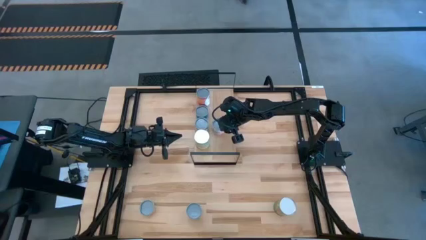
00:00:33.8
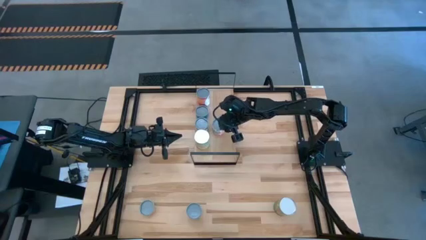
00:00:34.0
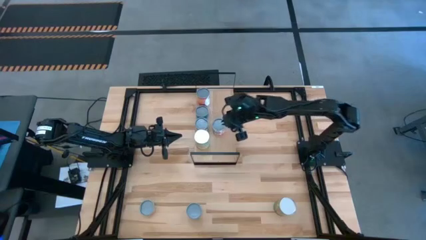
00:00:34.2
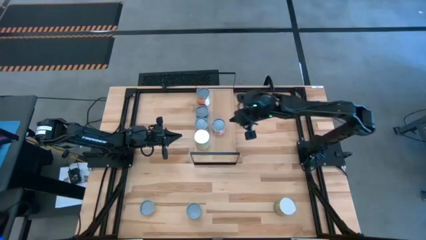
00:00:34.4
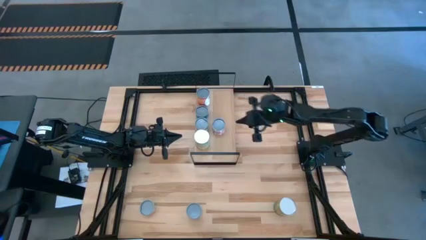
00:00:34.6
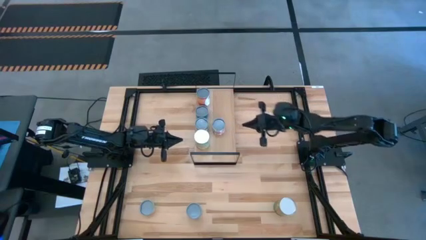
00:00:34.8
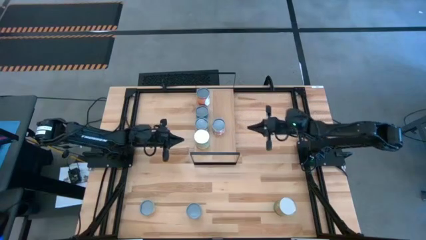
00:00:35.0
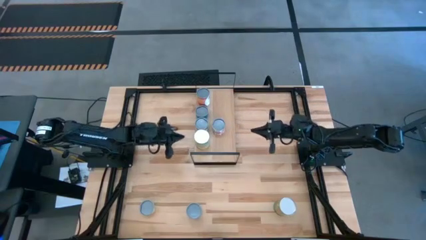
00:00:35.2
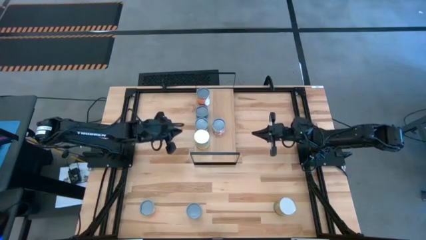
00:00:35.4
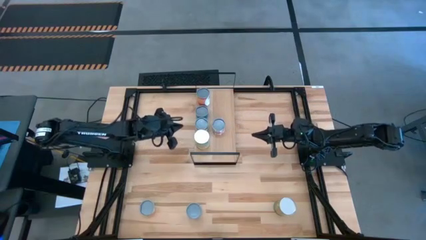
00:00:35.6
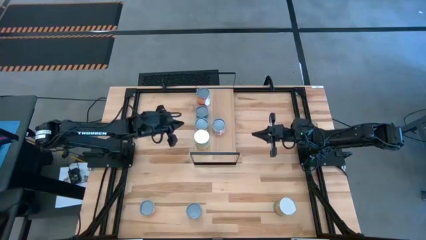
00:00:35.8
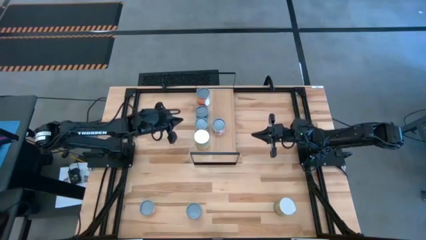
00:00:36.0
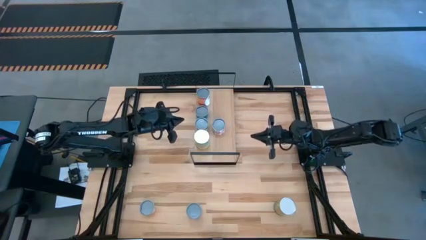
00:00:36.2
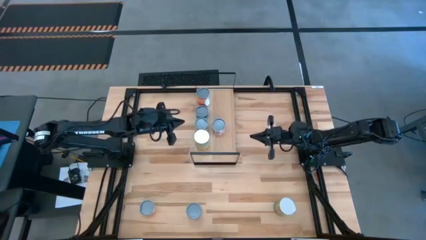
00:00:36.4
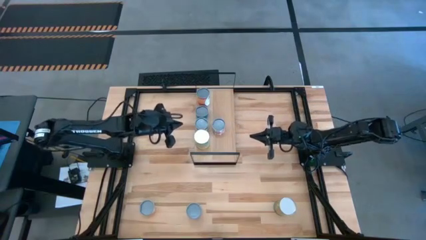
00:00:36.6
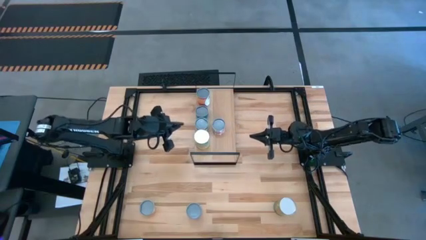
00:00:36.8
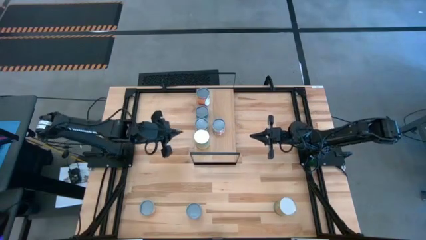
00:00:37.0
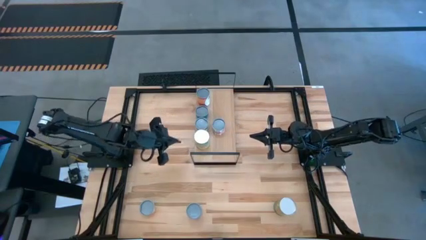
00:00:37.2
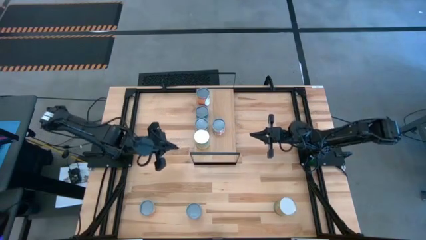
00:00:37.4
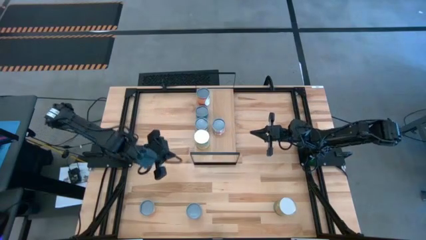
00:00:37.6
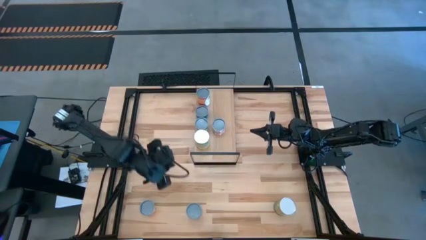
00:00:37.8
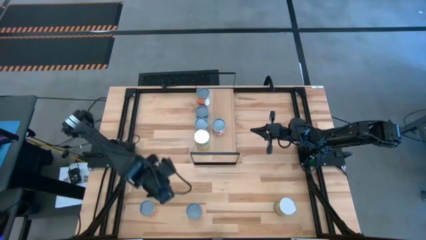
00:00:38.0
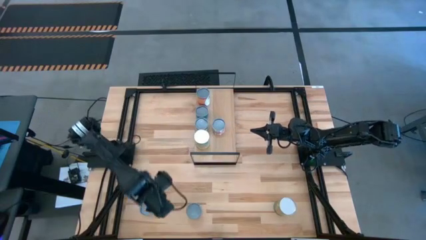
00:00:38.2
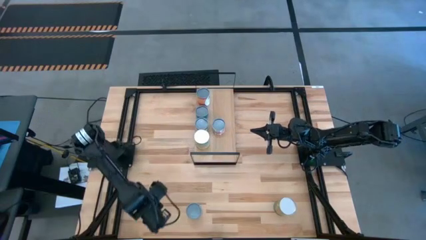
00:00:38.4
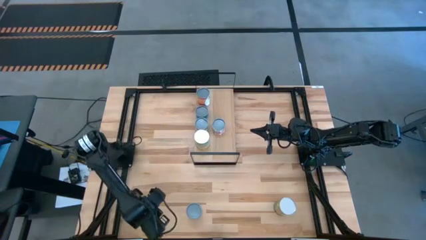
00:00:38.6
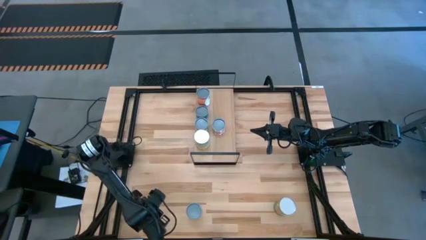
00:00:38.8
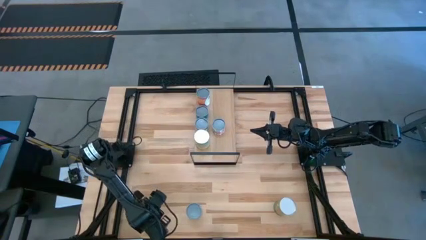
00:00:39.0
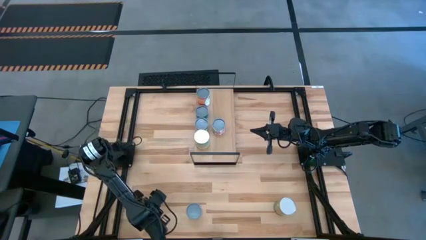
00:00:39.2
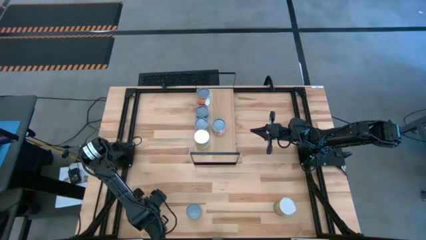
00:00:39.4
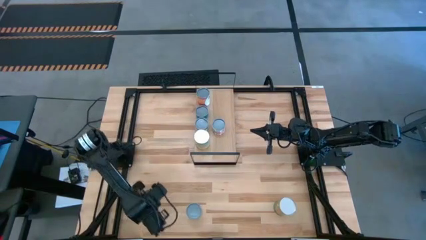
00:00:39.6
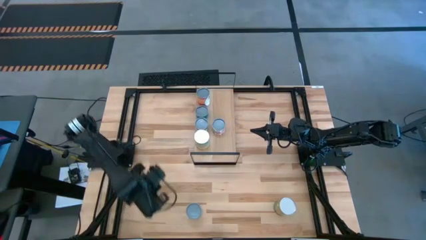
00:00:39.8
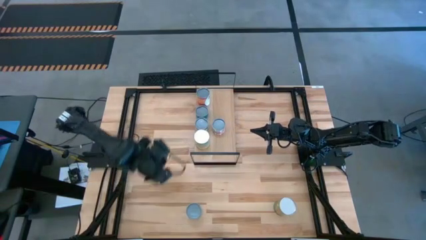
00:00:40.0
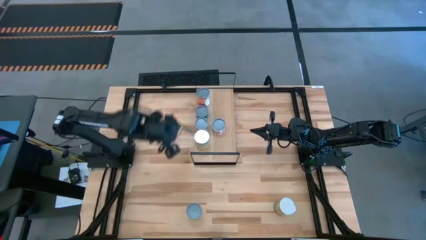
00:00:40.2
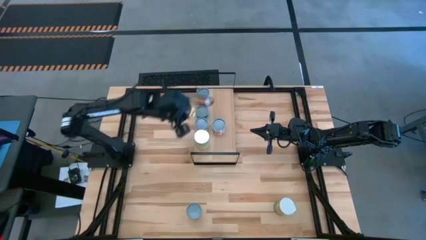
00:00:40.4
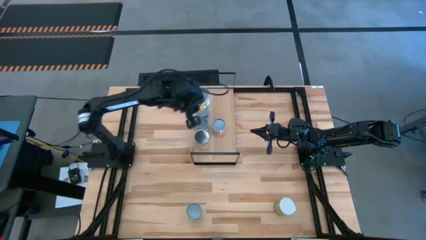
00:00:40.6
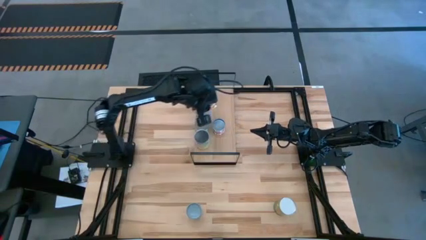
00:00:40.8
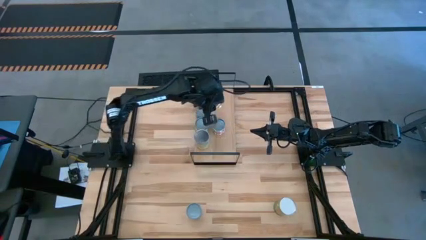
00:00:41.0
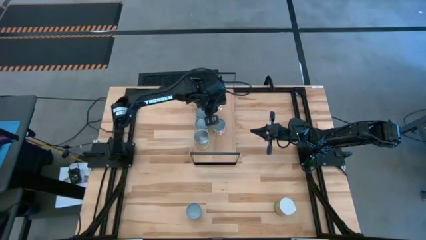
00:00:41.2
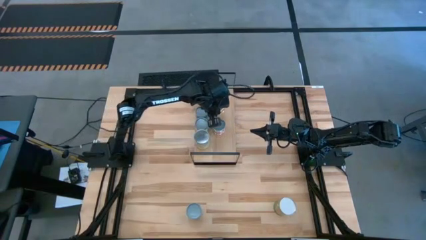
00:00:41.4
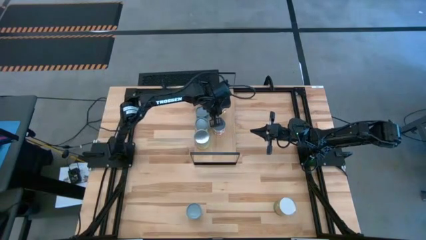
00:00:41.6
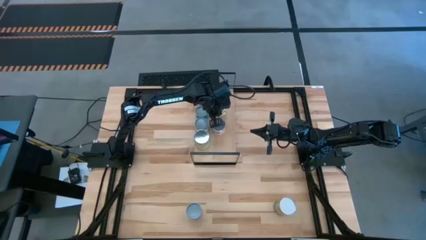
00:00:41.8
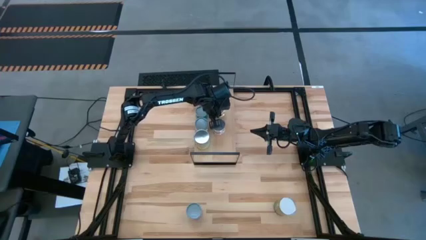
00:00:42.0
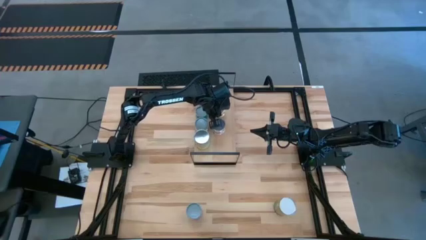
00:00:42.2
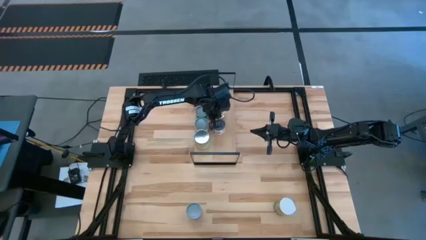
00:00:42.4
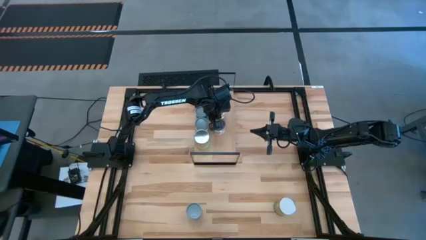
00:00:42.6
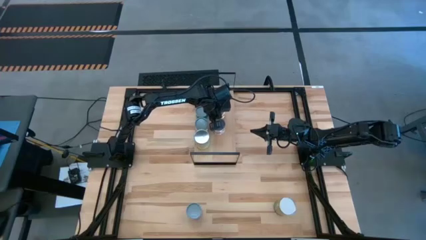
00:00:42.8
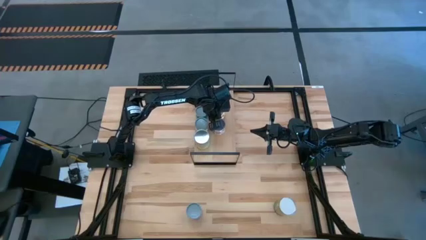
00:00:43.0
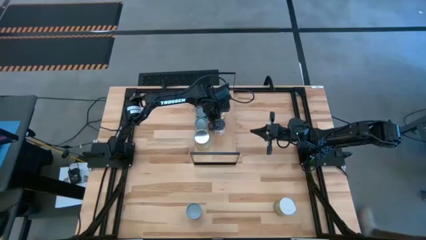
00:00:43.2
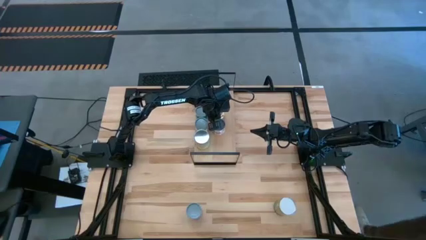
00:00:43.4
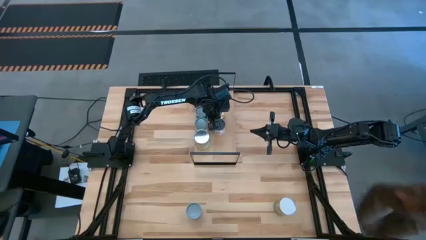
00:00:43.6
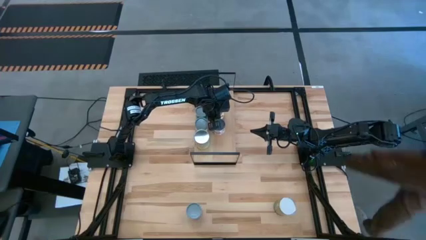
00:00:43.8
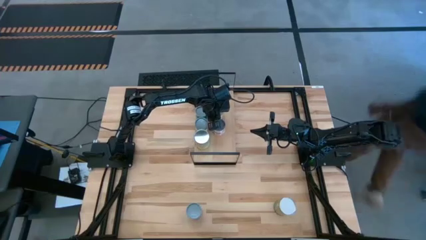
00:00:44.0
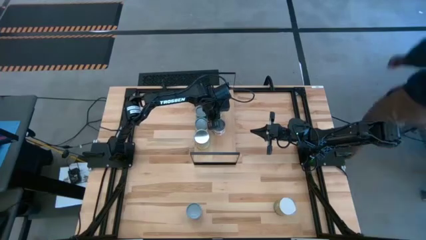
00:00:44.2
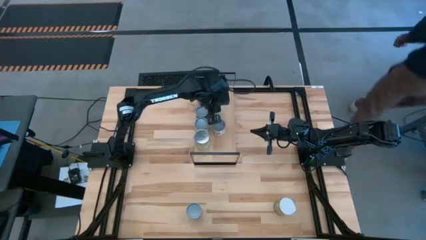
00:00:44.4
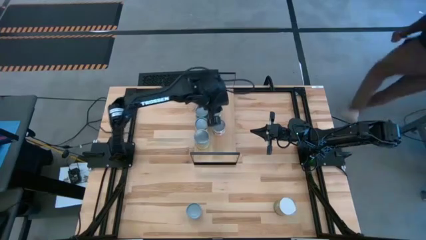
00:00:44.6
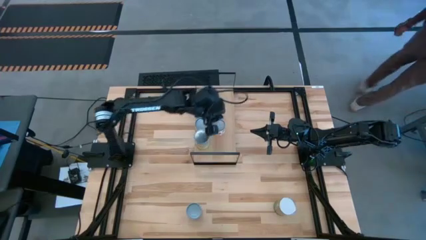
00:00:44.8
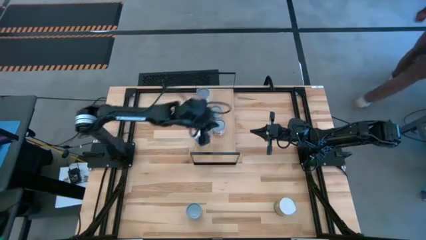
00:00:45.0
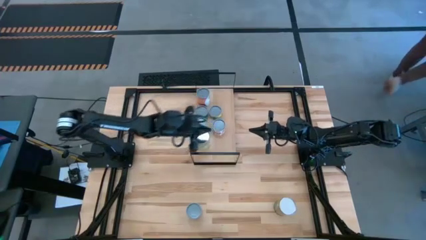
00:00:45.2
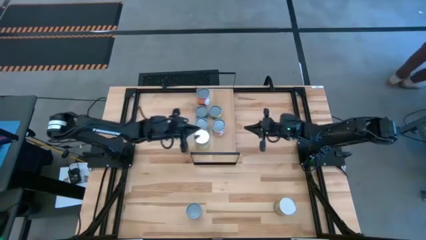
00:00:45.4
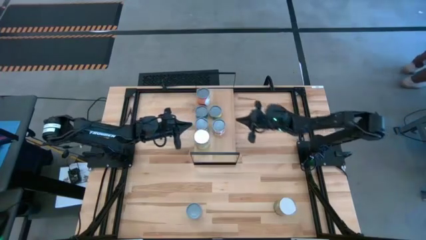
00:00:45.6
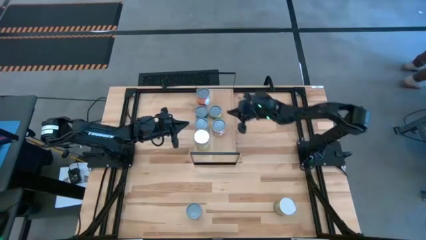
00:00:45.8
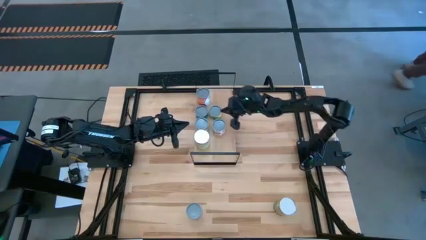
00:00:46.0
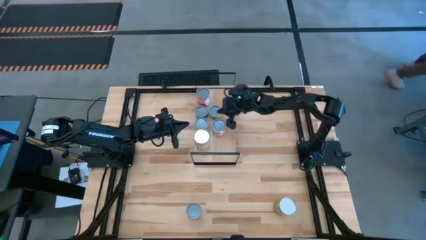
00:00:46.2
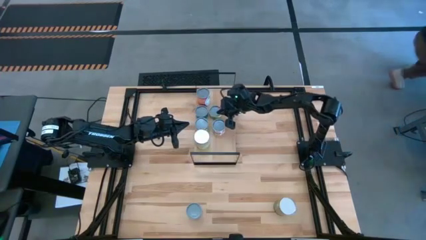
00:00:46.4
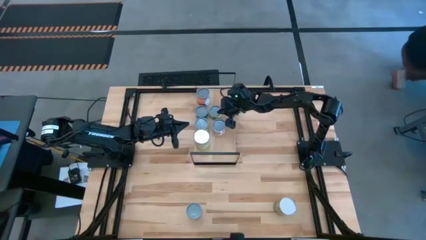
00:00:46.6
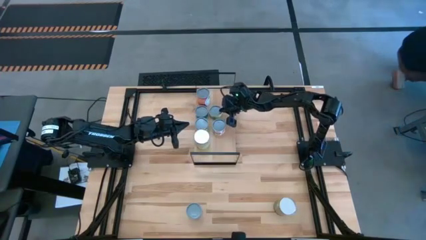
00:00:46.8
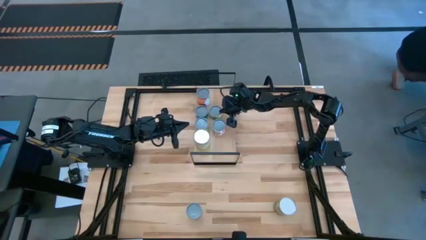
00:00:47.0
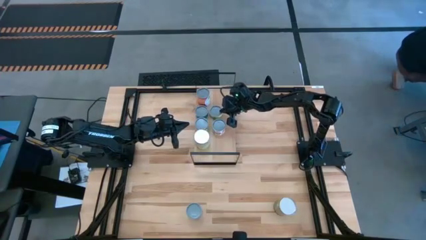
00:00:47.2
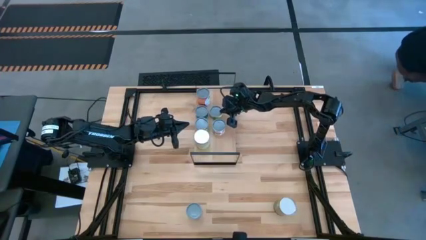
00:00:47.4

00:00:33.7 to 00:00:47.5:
Task: Pick and place cans onto a shelf
Put the small canned mushrooms on the shelf aligned with the small tuna can

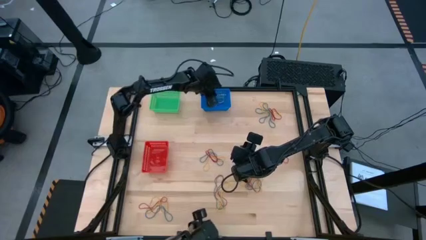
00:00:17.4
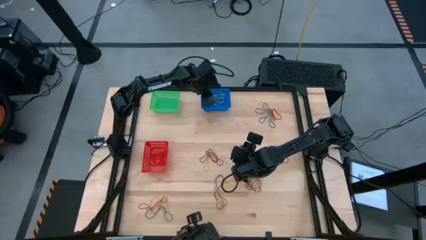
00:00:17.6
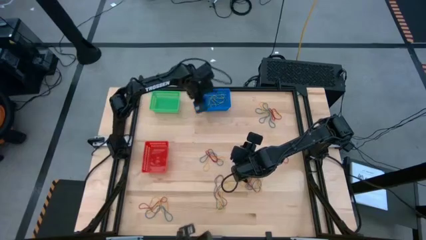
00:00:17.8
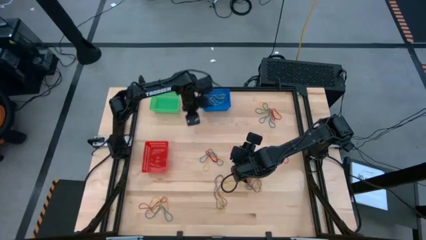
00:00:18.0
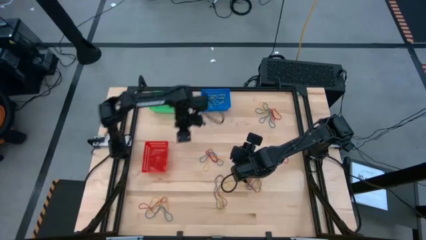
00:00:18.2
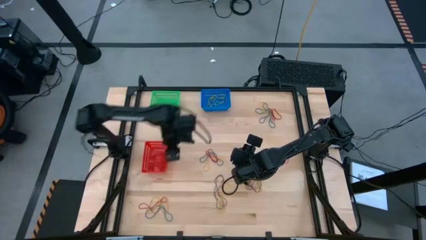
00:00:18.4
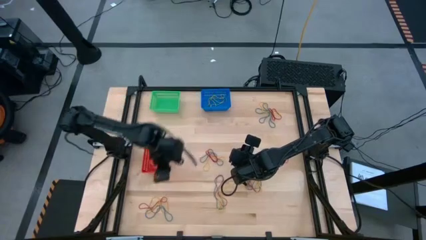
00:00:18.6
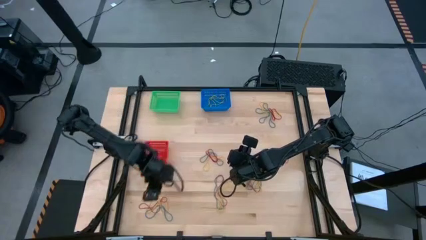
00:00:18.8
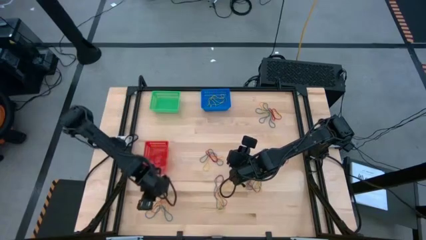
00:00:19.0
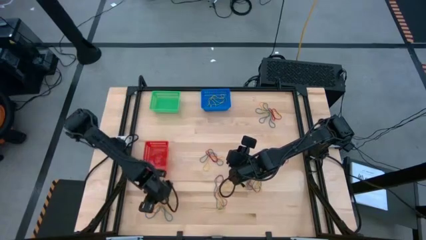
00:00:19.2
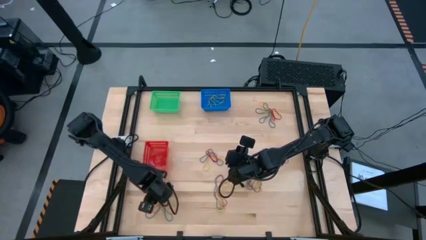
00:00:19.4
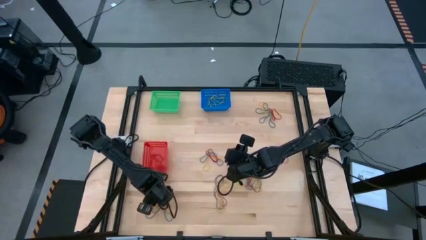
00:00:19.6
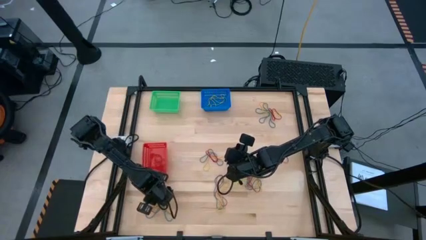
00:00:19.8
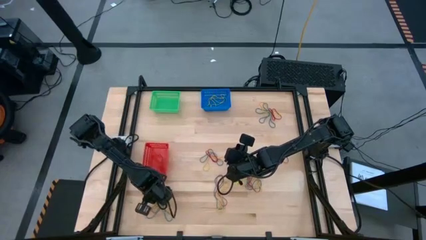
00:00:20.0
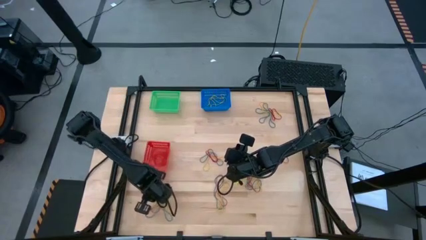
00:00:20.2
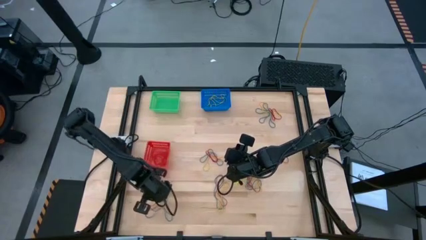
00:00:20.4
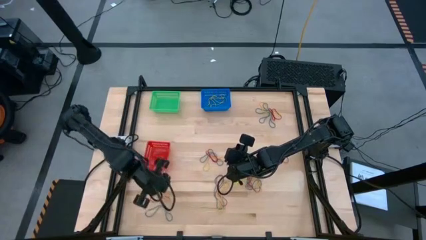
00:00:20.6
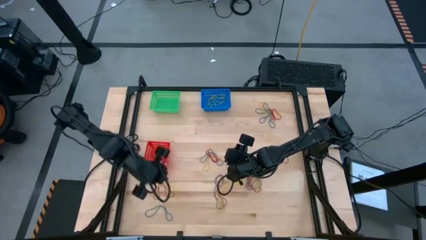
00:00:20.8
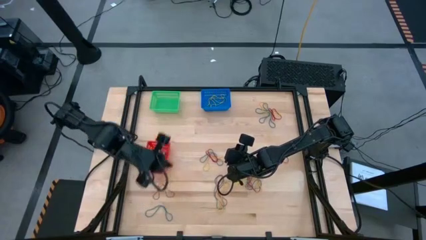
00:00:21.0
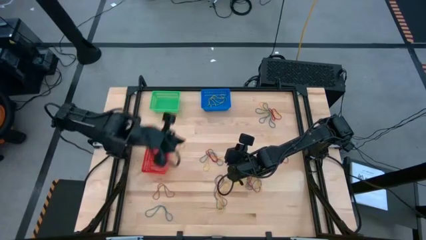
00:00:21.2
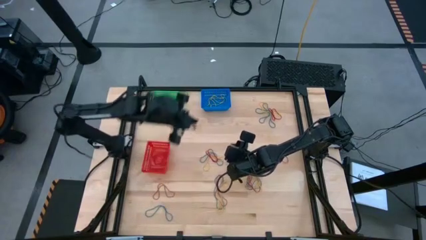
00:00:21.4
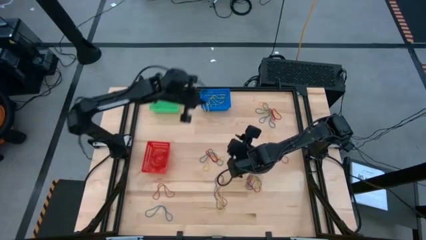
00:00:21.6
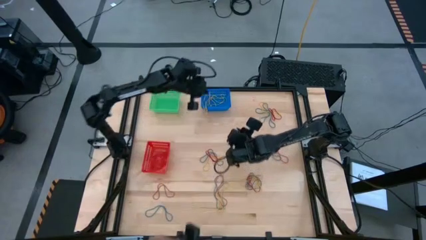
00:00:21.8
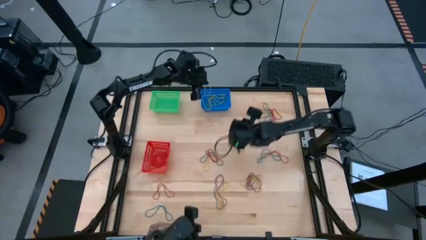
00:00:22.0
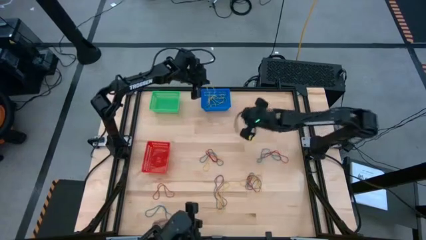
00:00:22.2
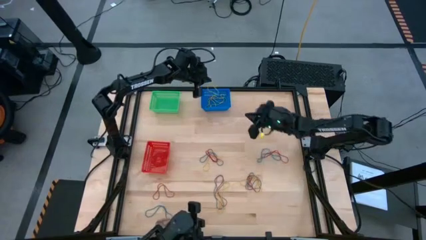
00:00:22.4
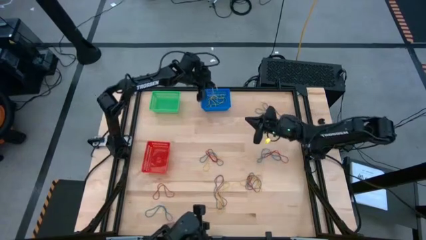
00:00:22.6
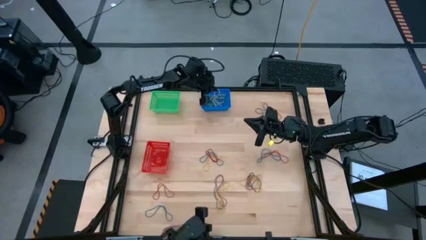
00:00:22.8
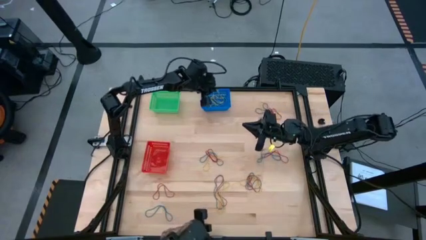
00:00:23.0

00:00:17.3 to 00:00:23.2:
Task: Sort rubber bands into baskets
Put the yellow rubber band into the blue bin
